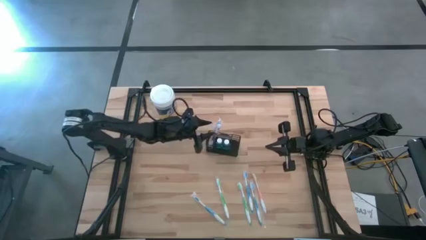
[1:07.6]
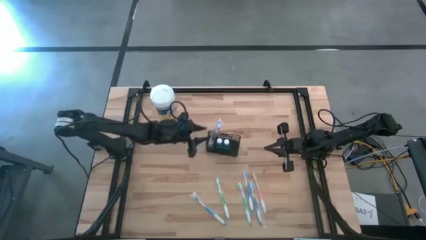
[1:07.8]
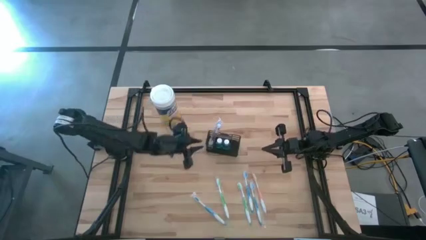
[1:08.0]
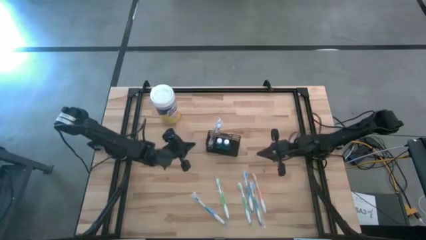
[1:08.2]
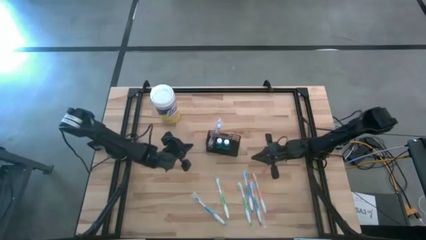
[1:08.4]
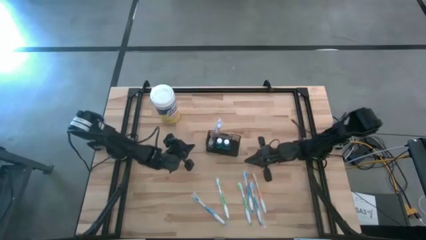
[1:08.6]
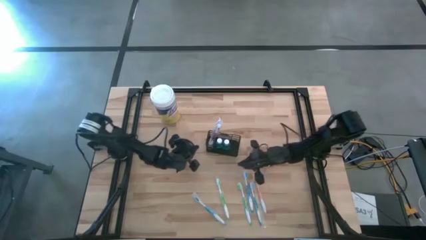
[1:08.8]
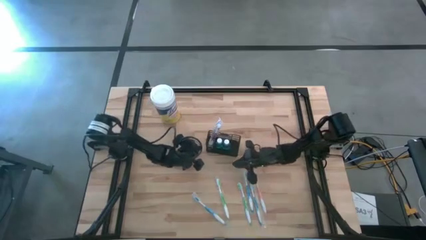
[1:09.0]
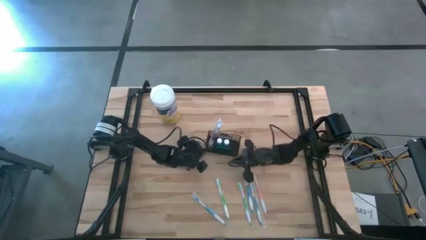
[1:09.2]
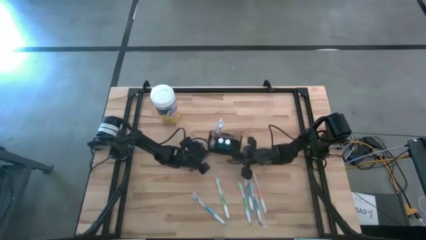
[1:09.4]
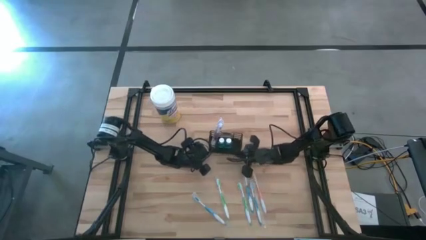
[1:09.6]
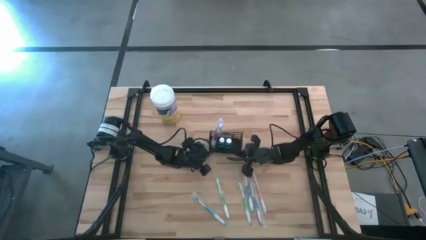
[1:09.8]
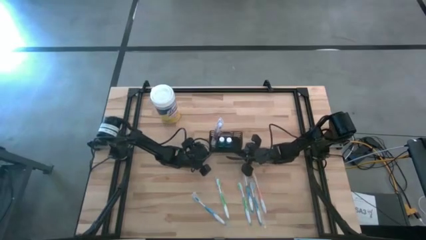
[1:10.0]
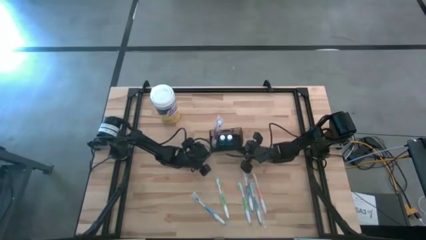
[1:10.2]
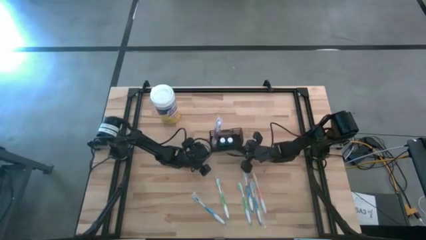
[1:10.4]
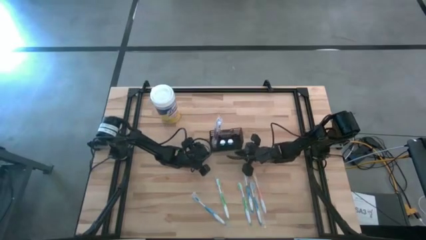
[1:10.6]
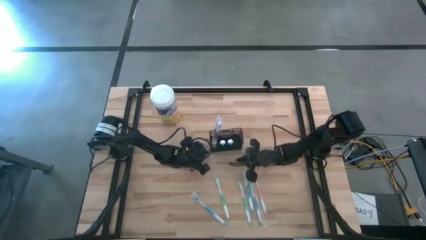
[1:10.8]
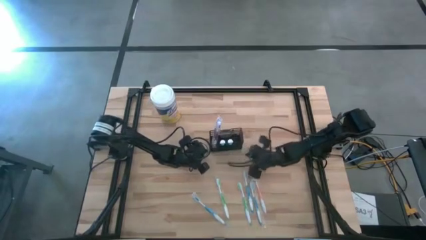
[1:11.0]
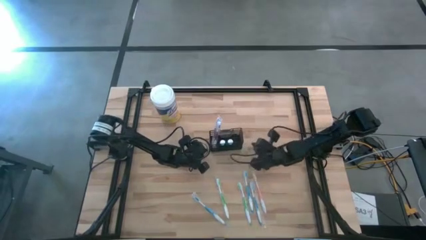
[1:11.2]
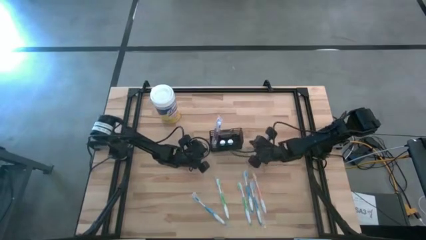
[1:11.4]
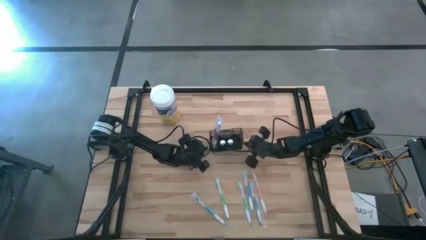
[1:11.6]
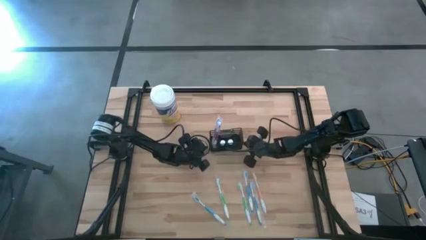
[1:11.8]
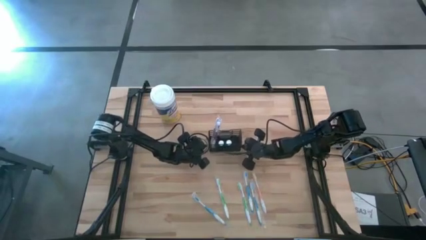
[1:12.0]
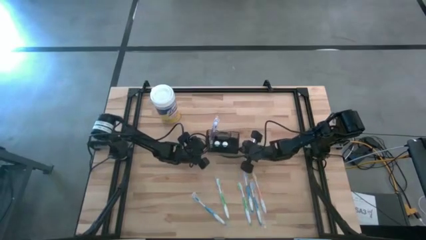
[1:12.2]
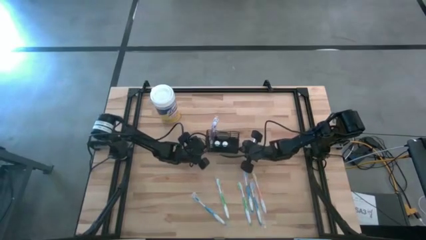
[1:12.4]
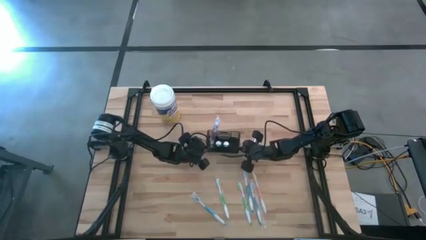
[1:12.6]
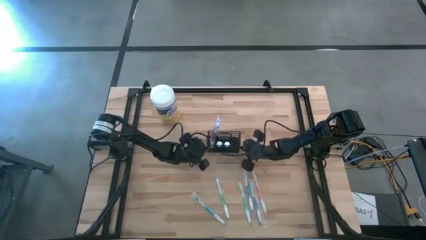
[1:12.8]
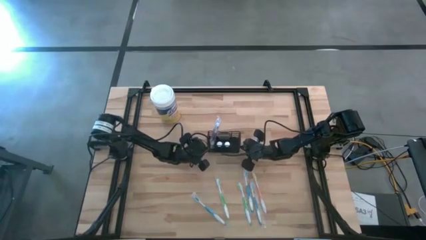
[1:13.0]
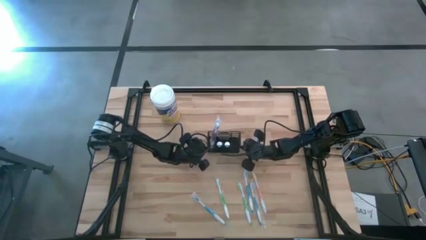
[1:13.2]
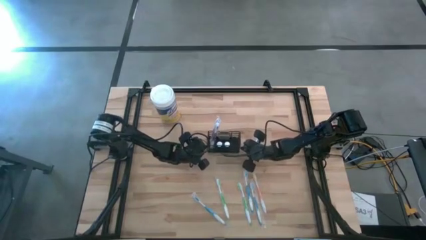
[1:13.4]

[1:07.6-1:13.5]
Task: Pick & Place toothbrushing station
Adjust the wire organizer on the table

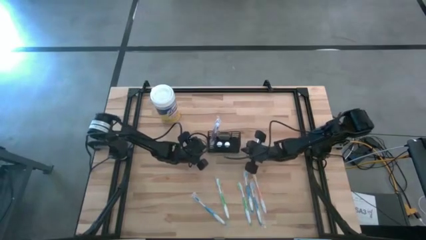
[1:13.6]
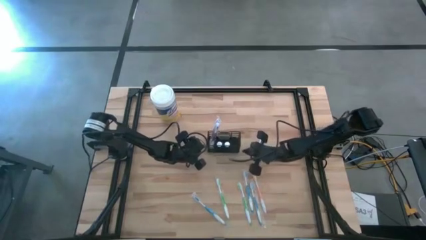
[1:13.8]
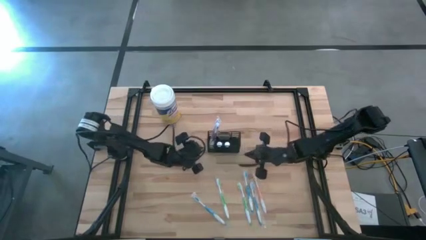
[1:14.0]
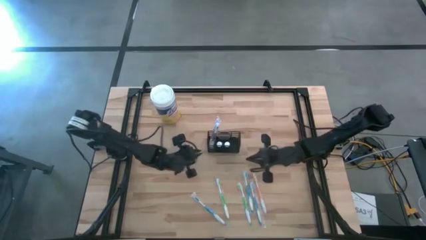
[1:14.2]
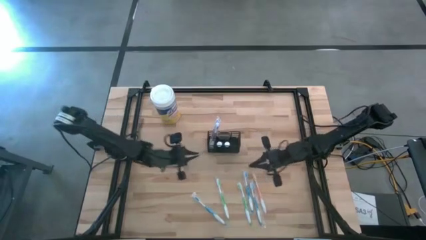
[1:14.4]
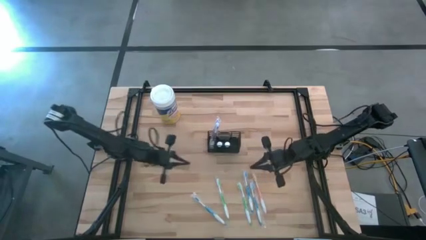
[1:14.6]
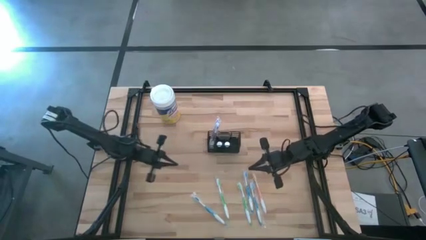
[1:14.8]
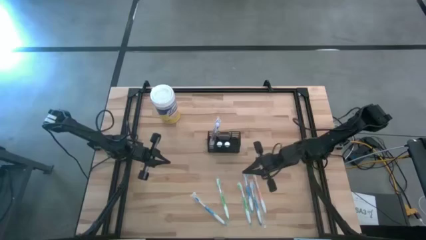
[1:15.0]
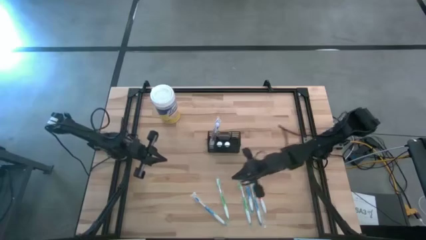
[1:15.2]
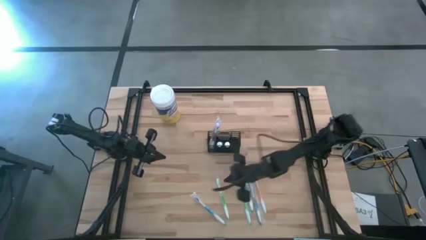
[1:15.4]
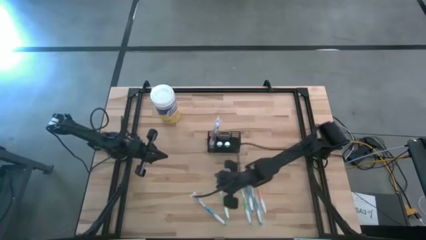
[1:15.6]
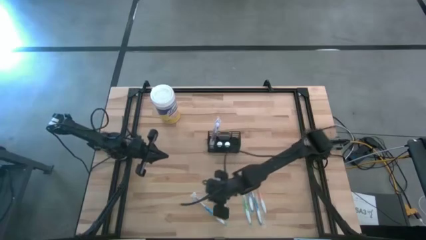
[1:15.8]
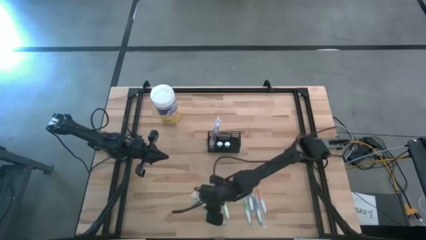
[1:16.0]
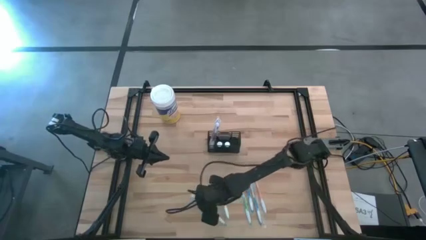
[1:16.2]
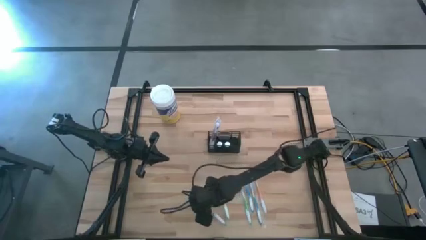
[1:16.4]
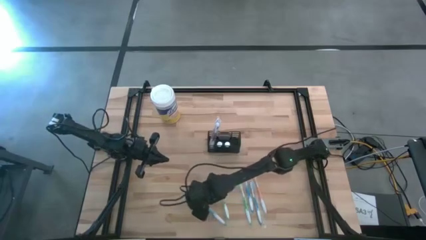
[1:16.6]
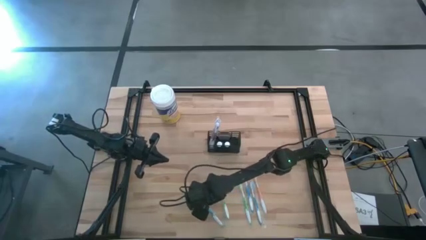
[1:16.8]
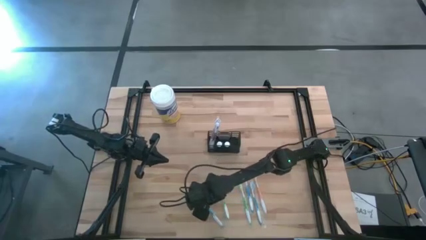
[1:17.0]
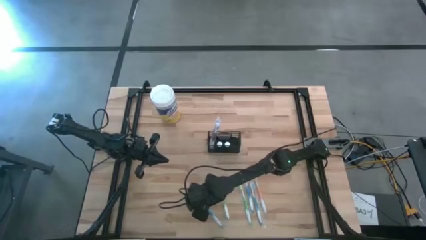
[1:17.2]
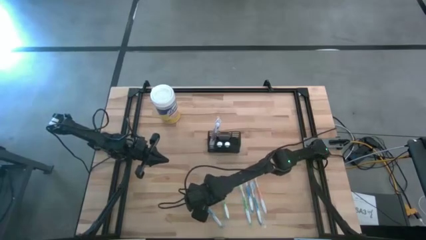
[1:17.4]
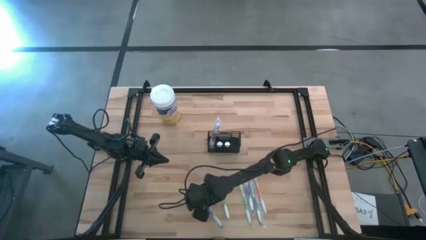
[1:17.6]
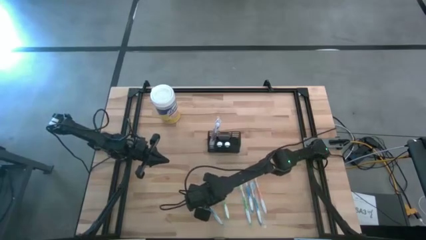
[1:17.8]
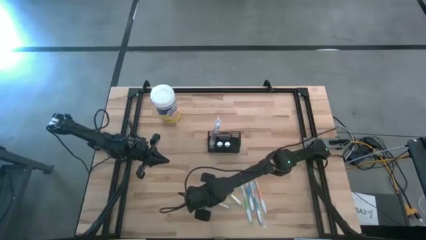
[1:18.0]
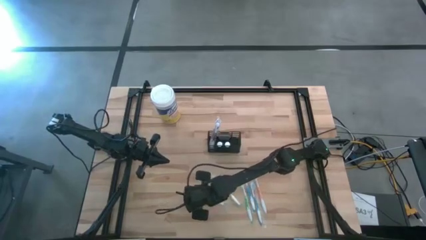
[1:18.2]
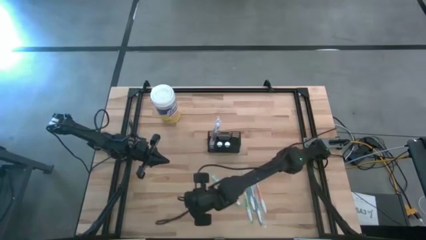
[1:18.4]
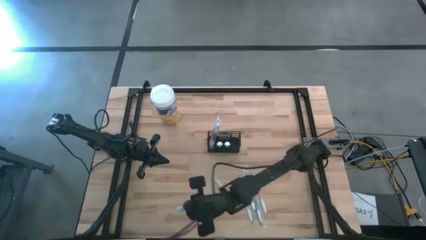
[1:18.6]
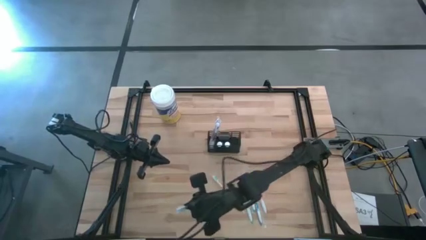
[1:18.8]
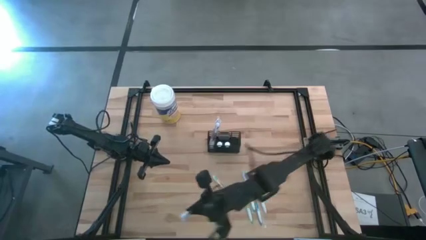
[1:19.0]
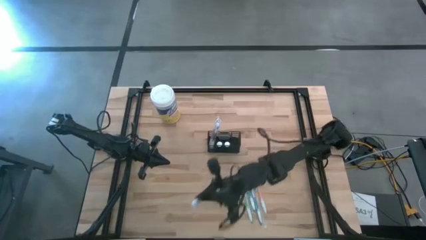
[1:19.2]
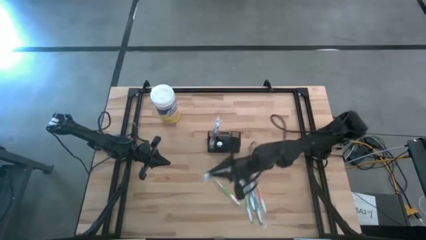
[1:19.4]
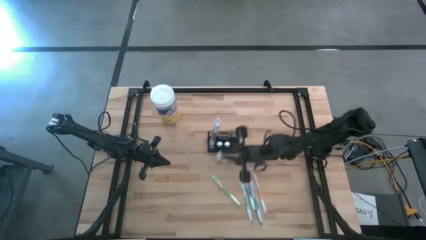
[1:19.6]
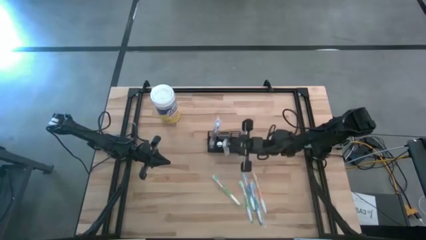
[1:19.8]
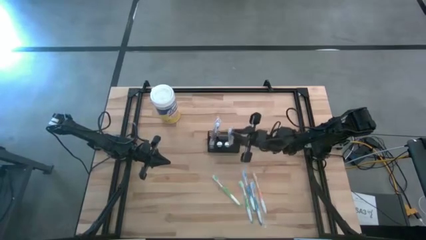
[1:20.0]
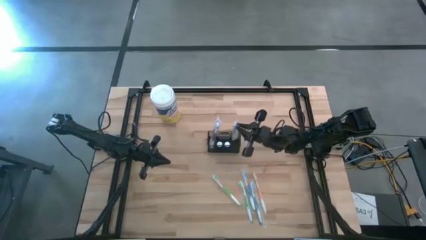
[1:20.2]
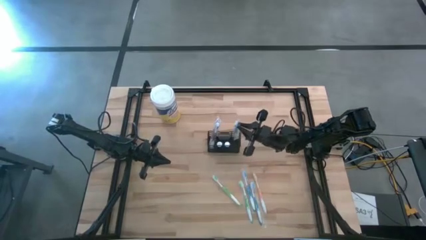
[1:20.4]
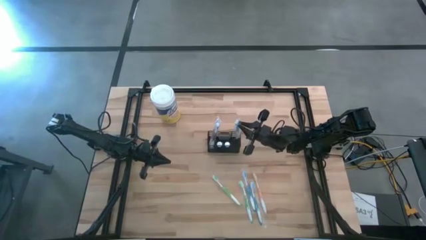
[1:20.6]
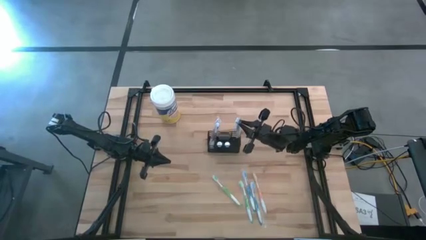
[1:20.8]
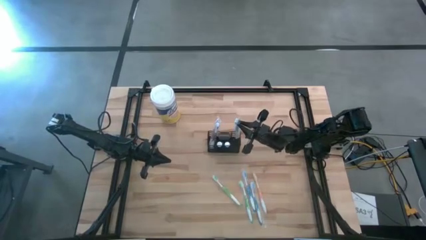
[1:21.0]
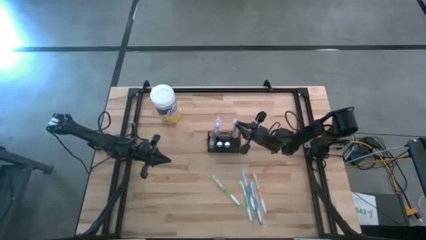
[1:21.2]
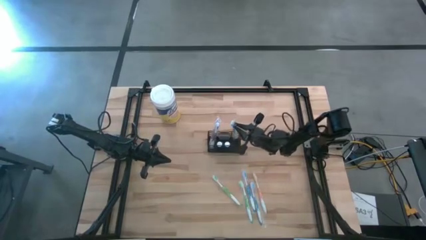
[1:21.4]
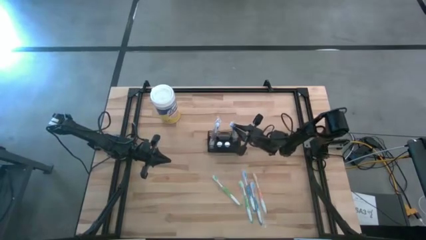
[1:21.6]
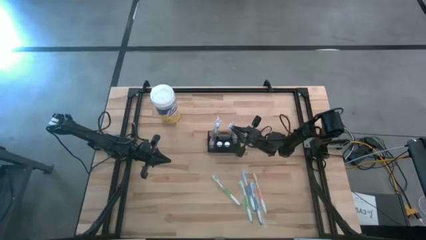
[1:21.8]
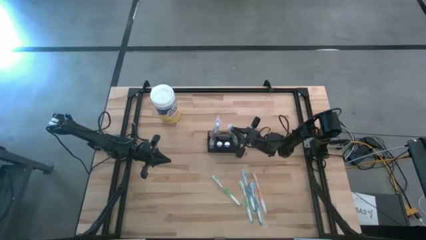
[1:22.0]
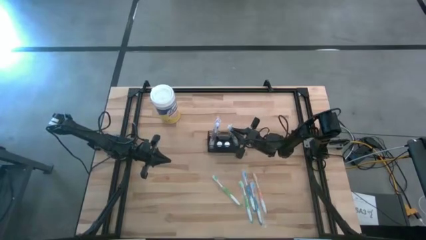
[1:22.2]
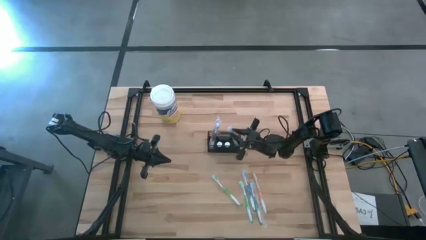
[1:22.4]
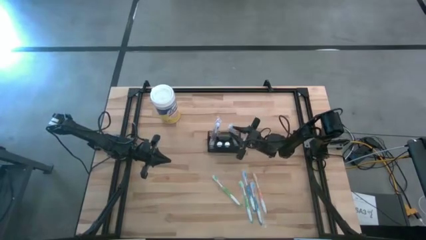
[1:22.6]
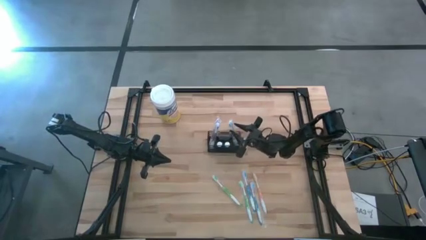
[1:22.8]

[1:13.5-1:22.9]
Put the left blue toothbrush into the wire organizer
